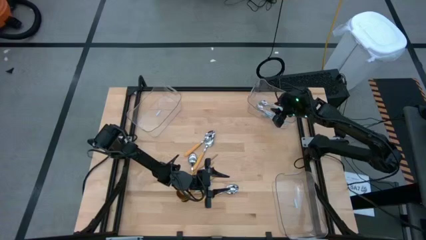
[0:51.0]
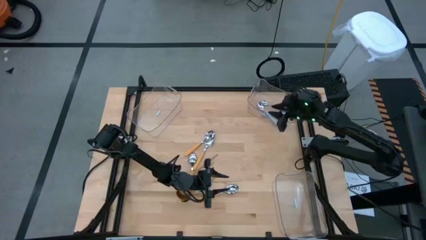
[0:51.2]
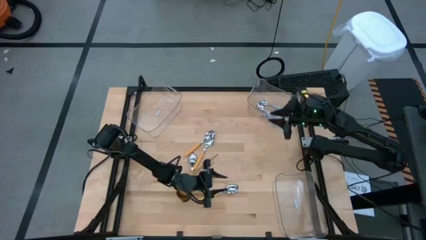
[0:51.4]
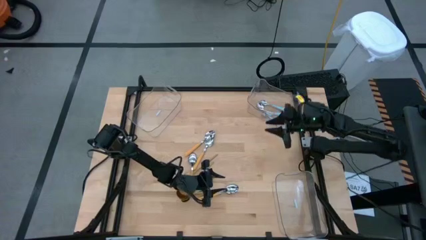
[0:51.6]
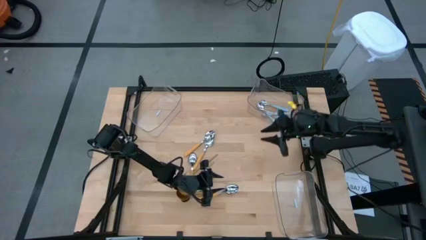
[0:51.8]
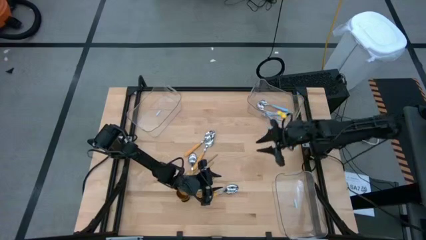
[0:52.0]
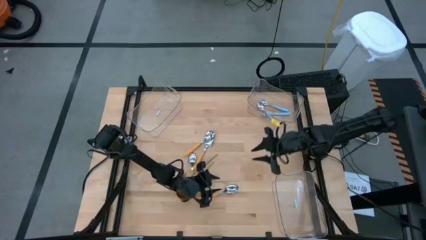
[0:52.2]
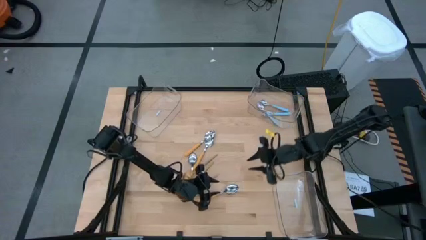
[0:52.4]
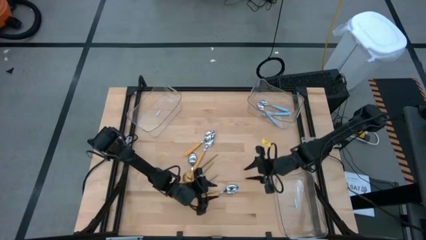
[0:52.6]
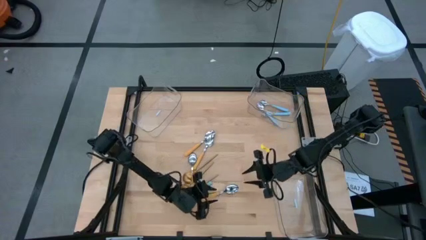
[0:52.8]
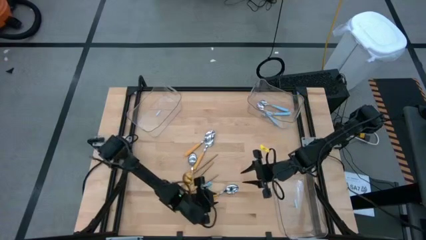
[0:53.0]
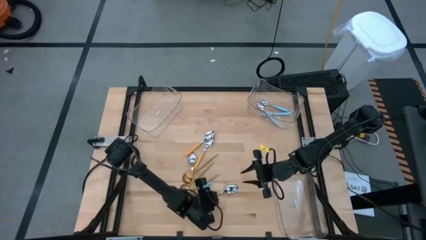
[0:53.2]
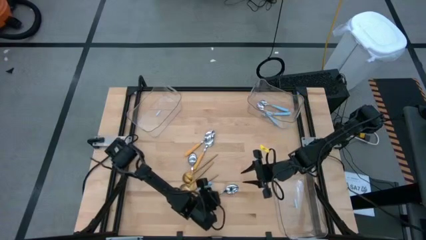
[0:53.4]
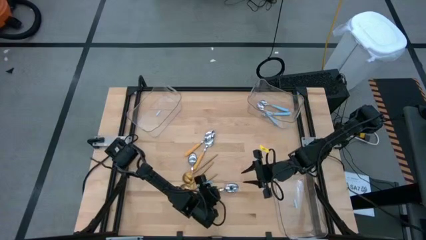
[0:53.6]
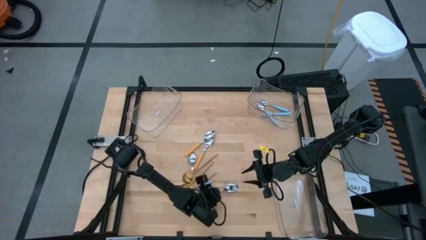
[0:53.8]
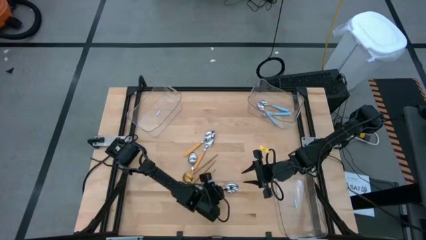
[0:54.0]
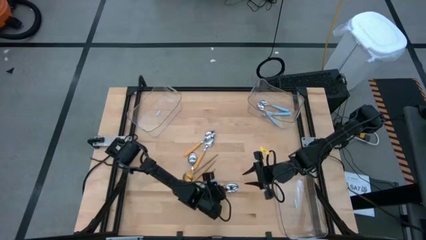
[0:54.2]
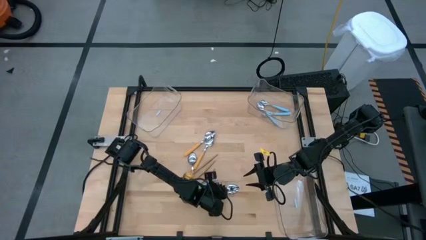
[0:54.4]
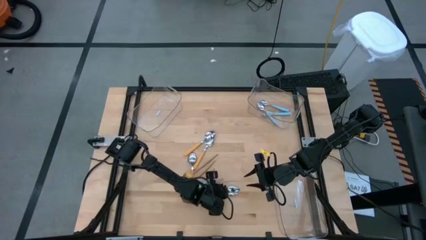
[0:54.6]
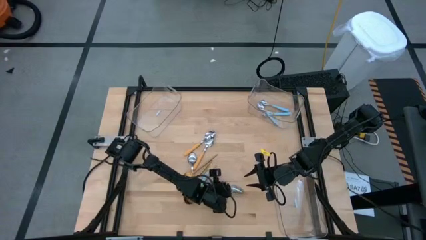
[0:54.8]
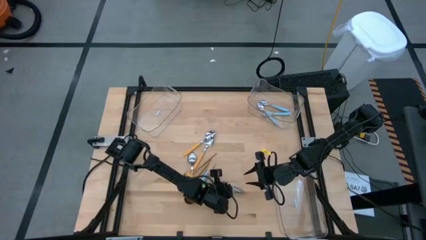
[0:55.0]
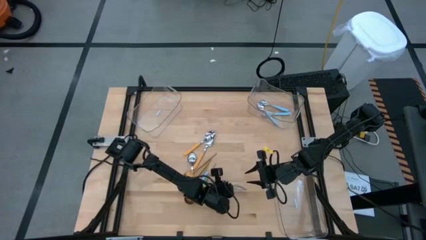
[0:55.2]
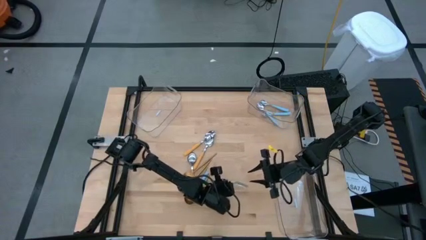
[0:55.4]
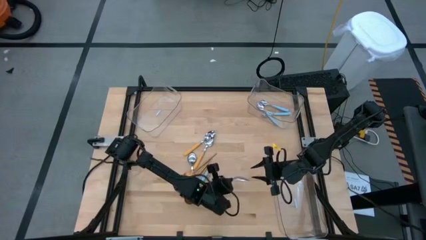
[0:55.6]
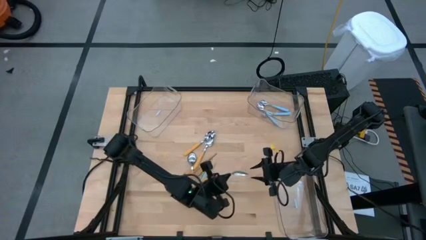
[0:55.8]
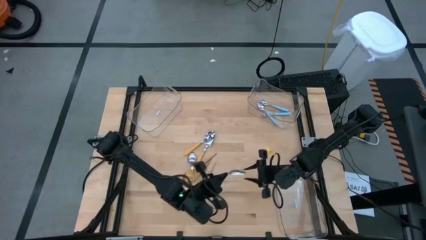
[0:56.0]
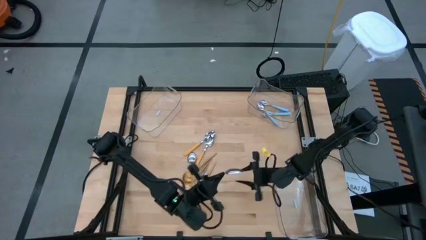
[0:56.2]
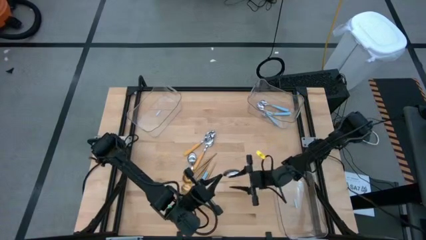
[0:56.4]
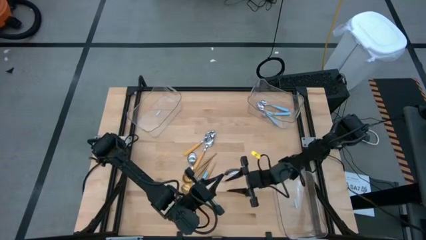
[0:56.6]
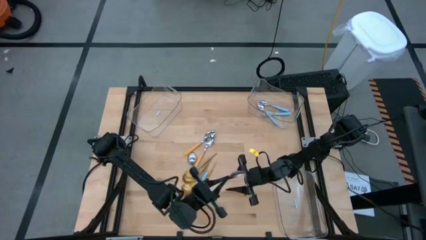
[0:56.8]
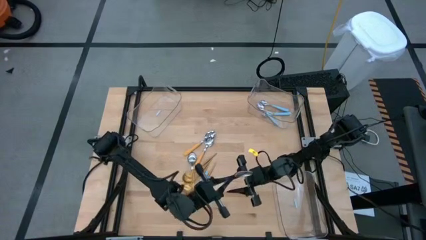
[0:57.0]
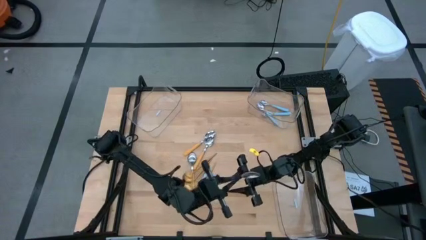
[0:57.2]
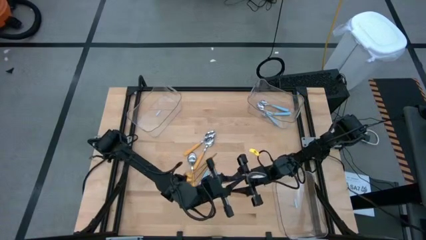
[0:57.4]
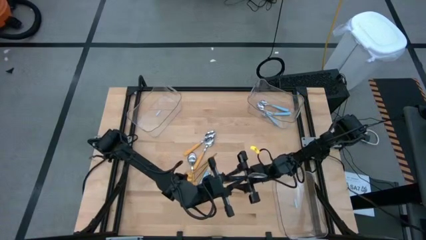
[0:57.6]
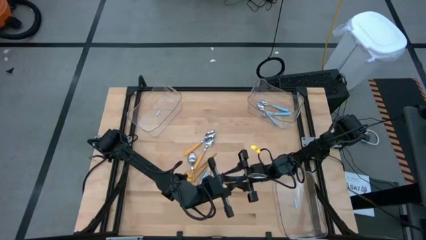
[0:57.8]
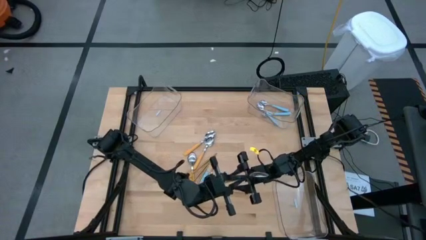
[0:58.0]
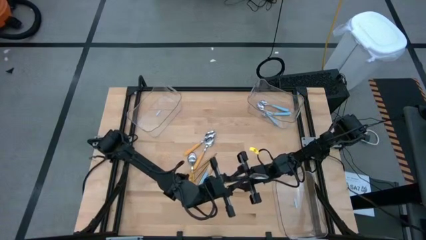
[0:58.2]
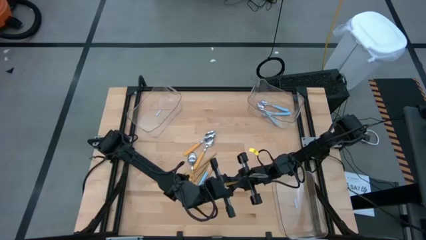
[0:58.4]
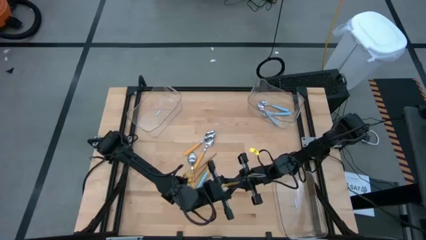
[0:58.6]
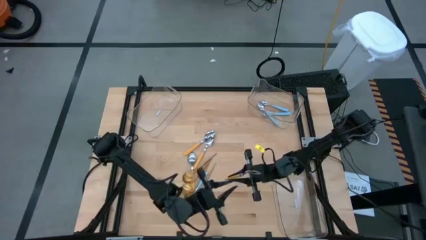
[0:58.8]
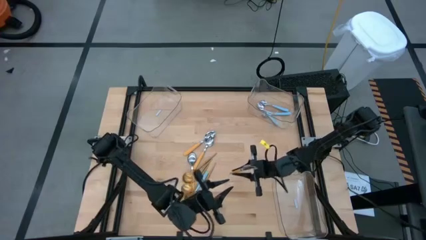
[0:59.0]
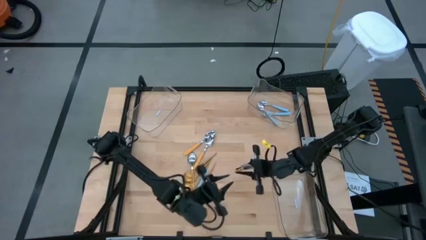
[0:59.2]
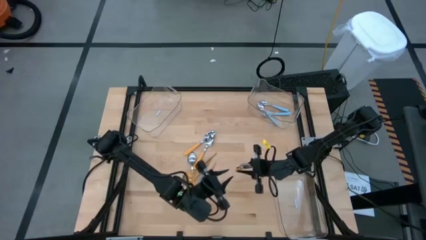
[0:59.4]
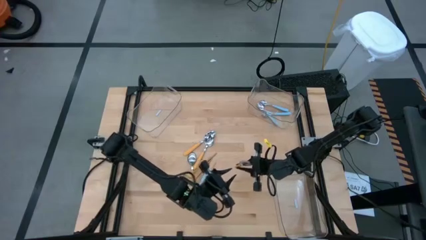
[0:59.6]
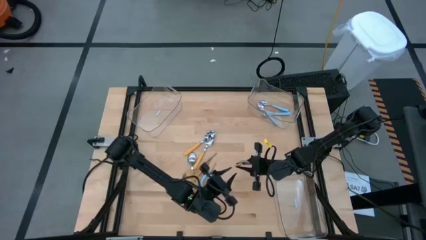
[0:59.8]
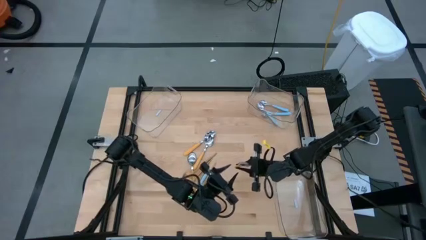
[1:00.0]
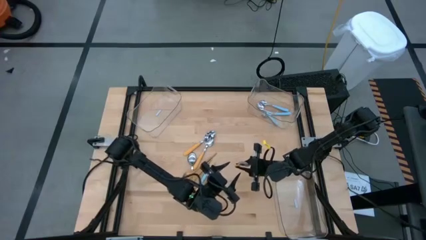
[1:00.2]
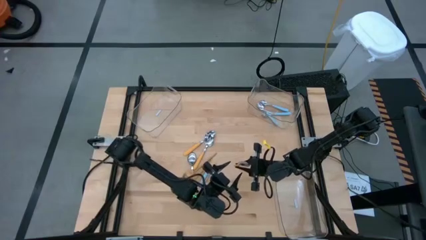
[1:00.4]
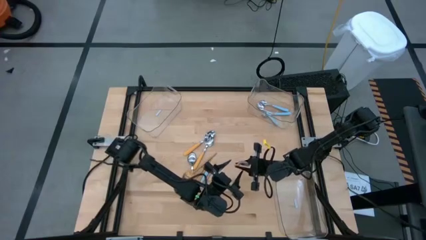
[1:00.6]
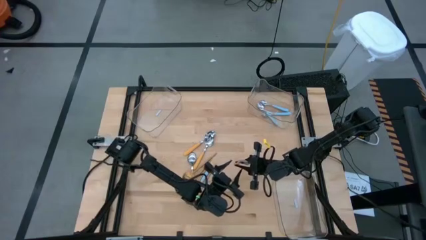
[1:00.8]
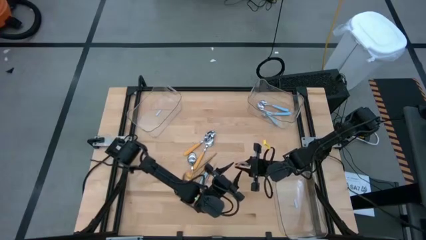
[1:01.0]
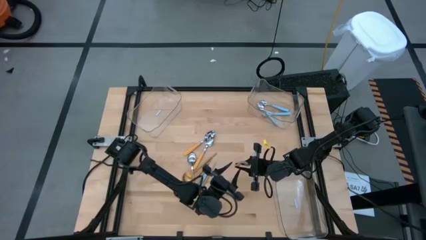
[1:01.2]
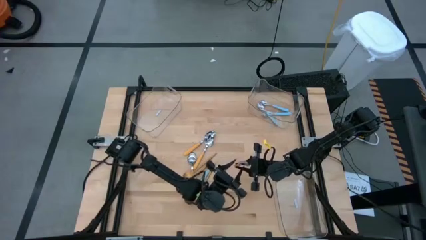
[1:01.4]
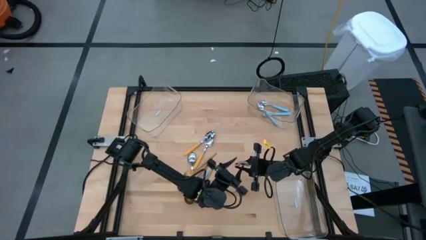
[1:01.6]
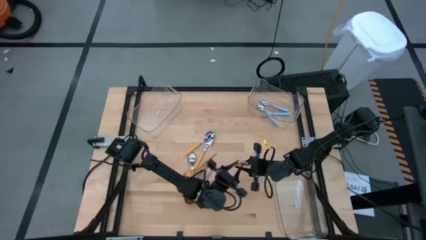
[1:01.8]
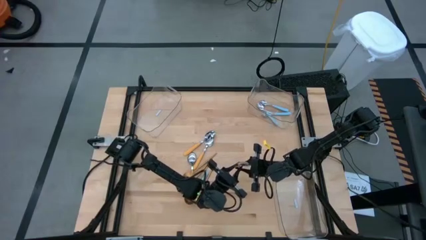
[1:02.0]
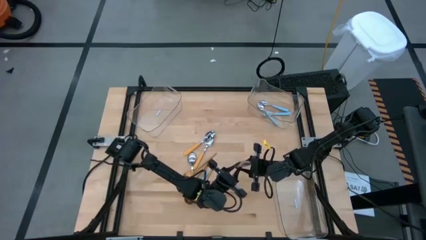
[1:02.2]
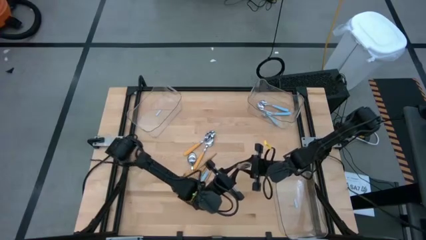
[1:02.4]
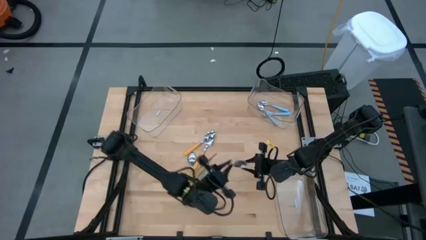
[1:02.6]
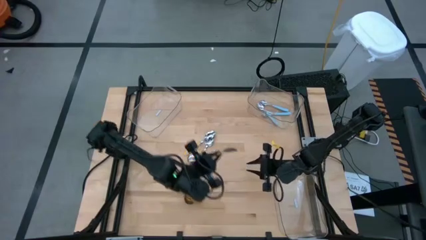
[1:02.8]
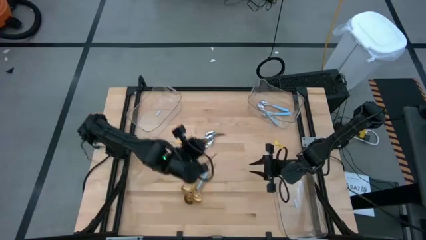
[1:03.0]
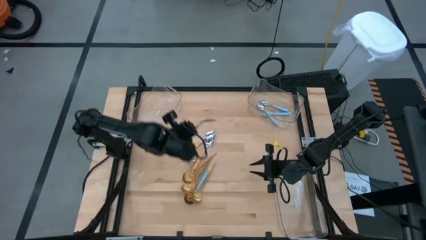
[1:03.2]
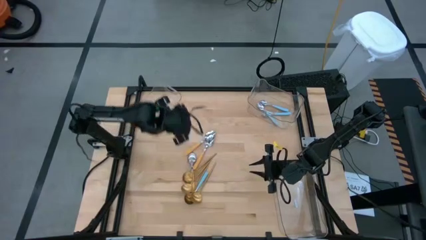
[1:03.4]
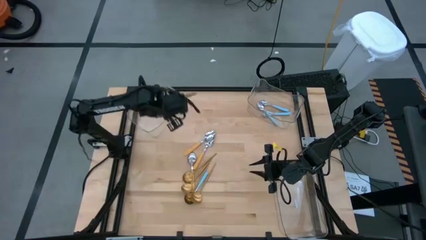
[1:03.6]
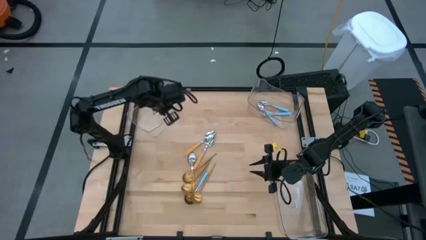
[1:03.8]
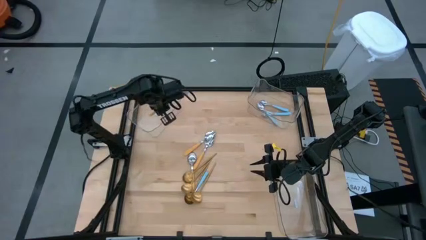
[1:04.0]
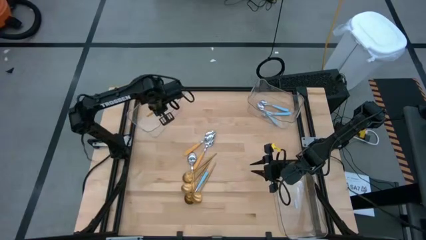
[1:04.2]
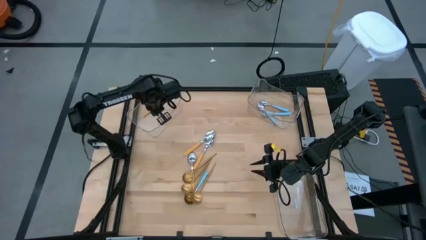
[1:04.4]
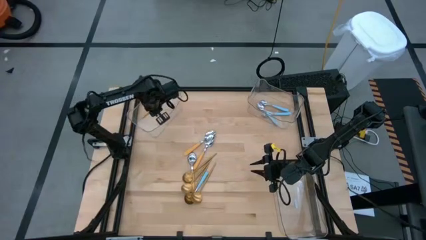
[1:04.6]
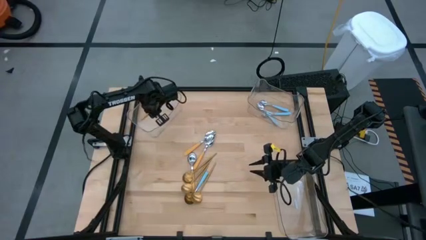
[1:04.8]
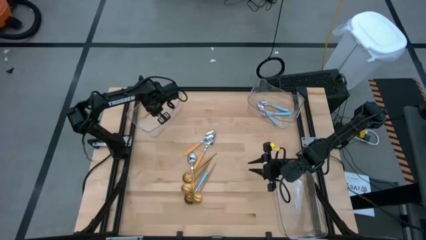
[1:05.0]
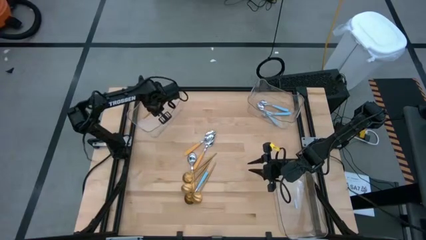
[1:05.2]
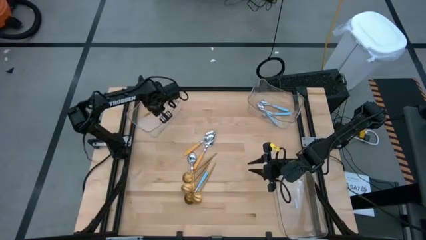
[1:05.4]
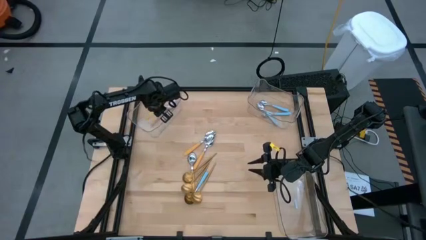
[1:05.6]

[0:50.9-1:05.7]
Task: Sort silverware by color (type)
Put the yellow spoon into the top left transparent bin

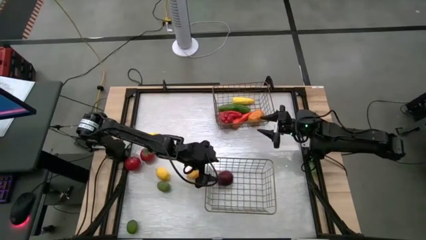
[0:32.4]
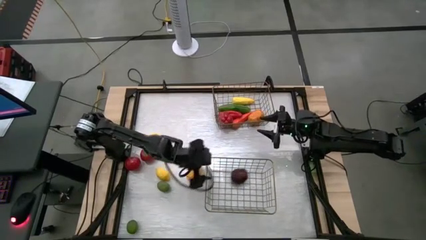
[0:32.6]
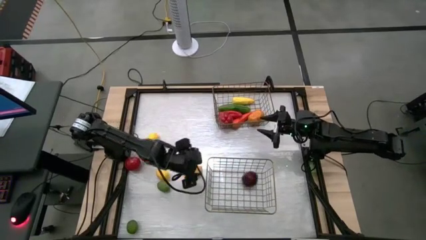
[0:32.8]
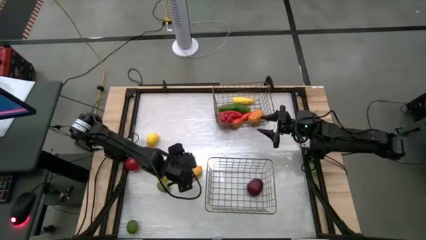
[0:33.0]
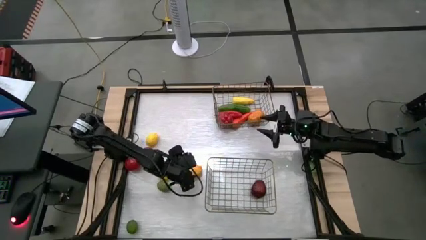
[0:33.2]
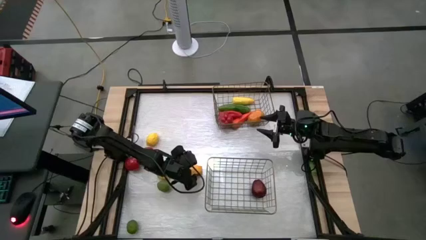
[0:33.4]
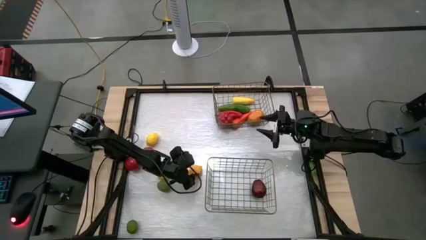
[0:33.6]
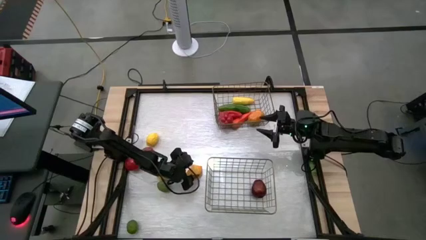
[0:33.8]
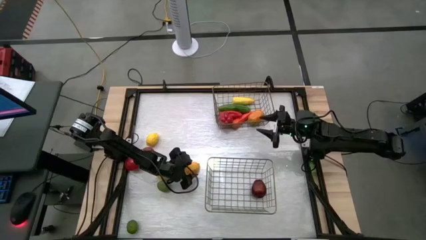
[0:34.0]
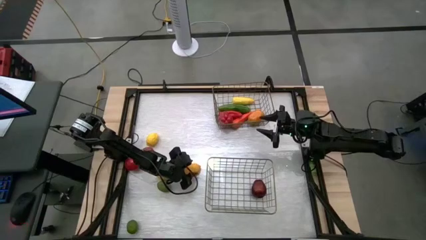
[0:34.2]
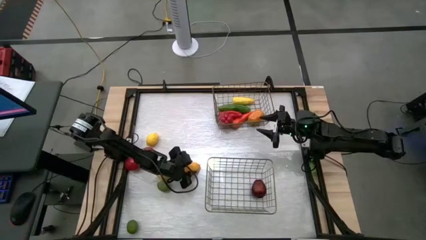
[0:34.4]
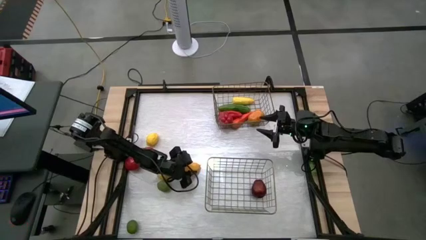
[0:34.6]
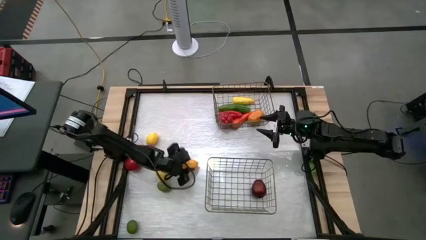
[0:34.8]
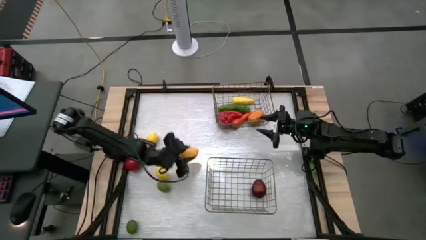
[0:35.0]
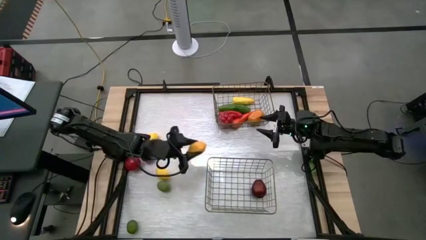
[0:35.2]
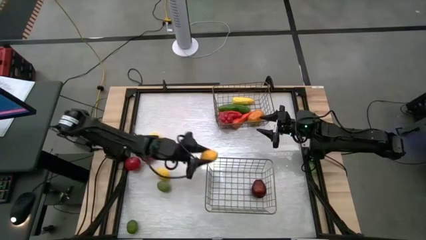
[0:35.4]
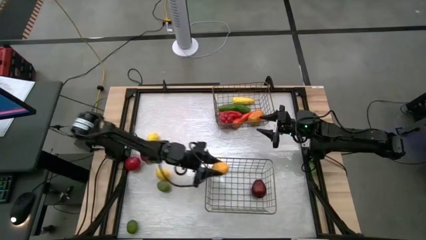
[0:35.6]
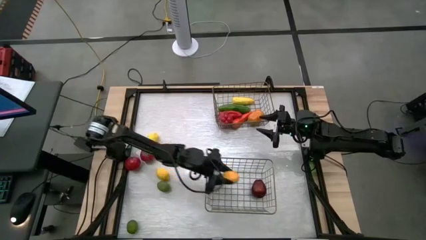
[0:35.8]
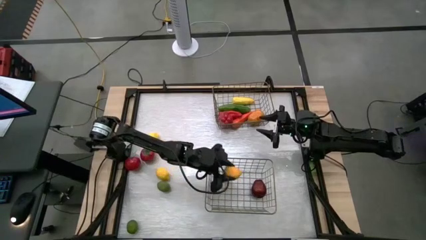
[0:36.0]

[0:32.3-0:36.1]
Task: Sort produce into baskets
Put the right yellow lemon into the bottom wire basket
